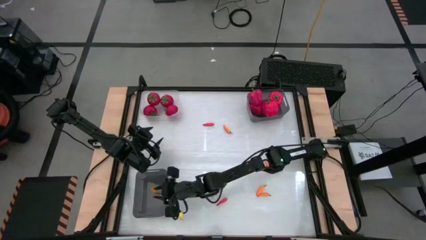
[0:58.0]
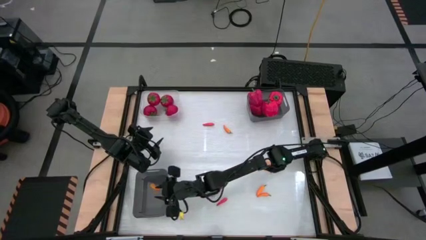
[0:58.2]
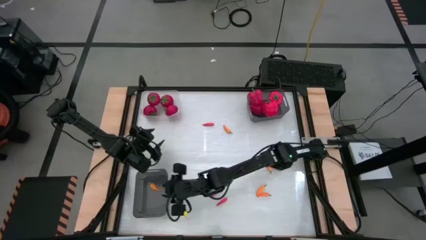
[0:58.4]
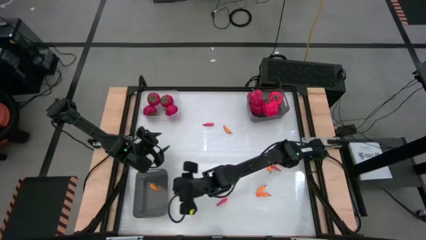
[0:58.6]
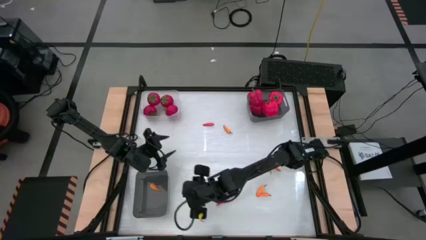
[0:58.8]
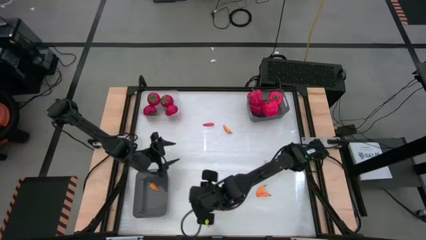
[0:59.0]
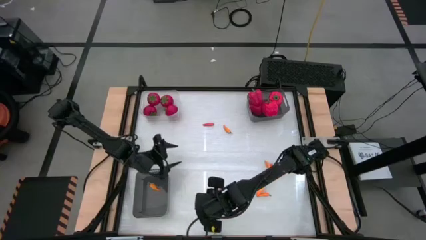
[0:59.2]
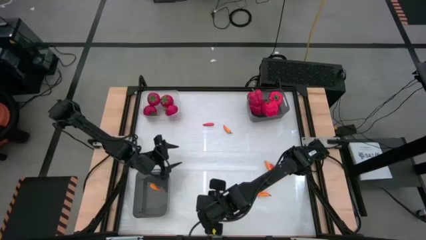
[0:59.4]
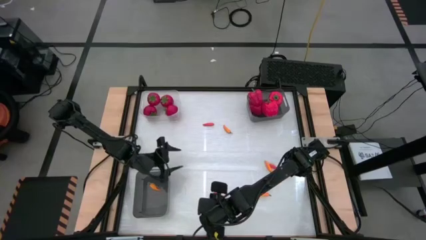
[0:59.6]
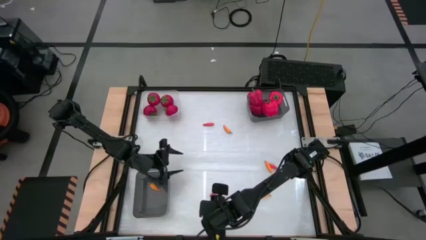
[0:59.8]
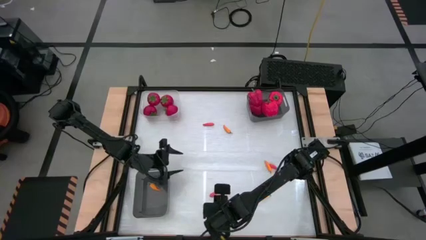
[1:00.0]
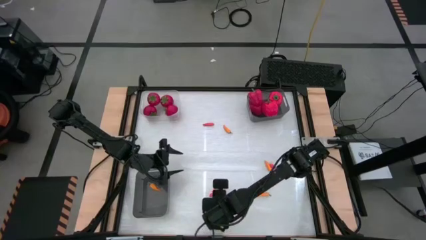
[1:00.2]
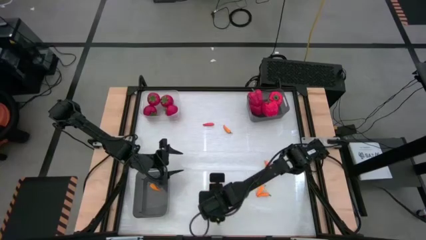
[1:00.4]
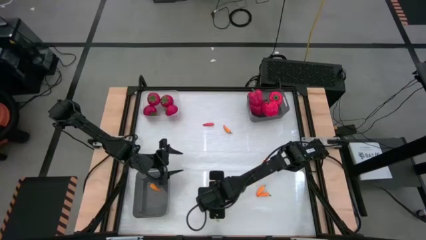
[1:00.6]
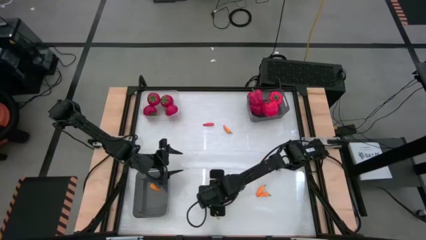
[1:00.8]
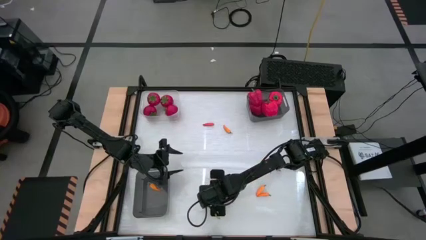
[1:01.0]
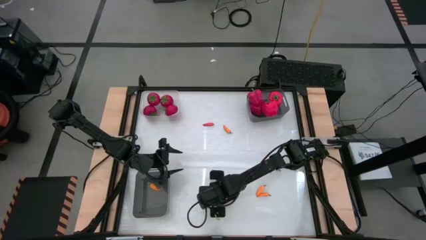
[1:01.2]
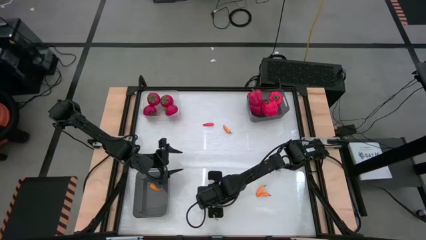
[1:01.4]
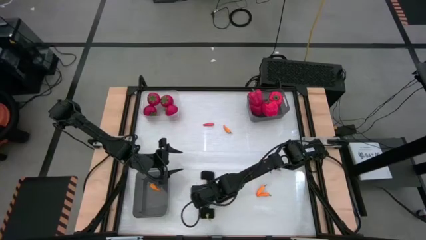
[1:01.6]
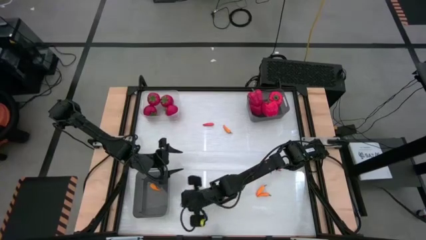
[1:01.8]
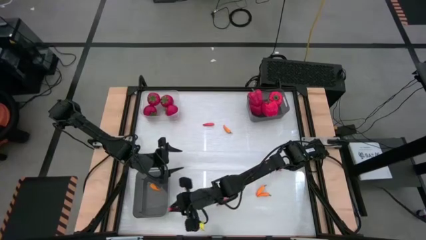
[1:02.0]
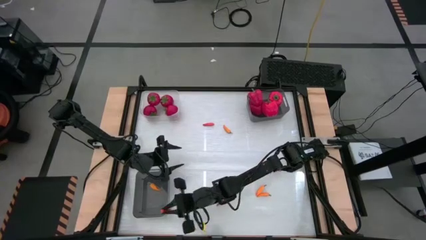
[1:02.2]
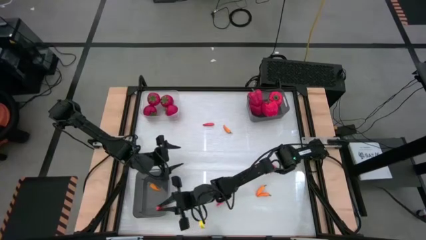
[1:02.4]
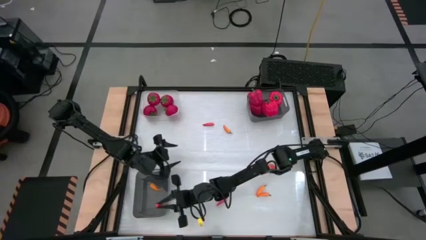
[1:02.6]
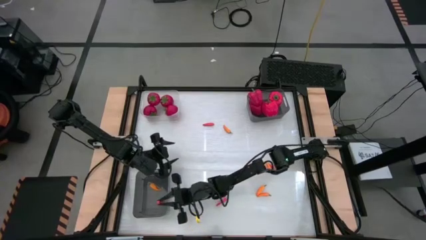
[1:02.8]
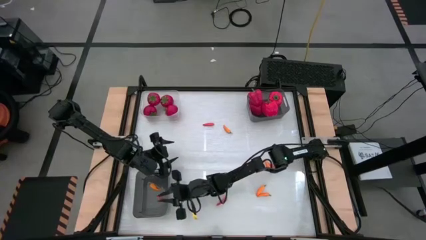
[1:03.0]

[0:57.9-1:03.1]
Task: Sort produce into baskets
Put the orange chili pepper into the bottom black bin

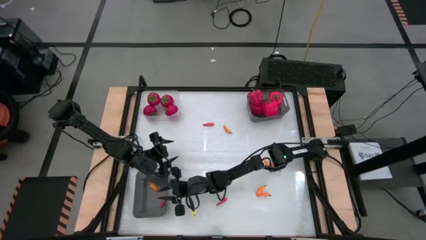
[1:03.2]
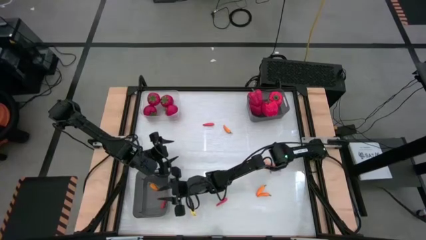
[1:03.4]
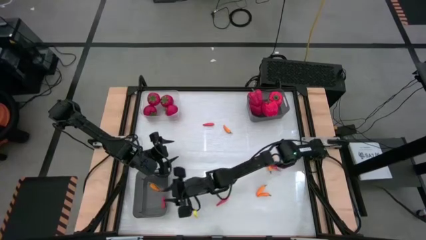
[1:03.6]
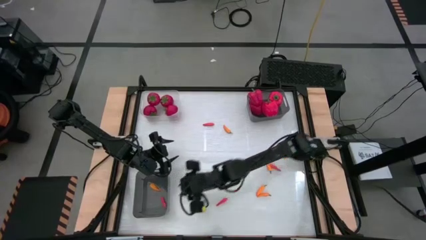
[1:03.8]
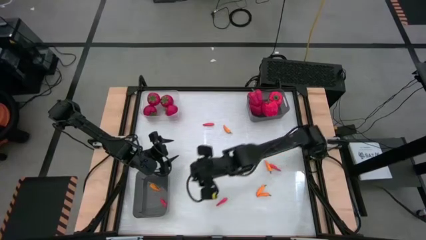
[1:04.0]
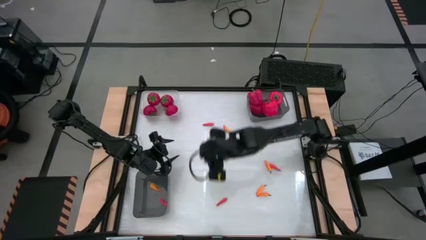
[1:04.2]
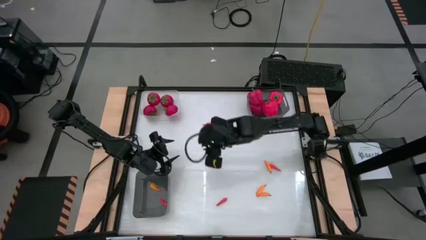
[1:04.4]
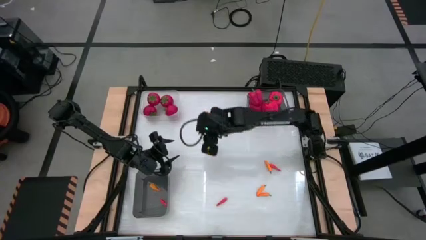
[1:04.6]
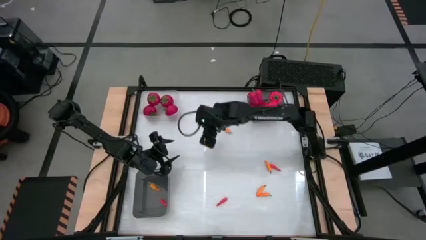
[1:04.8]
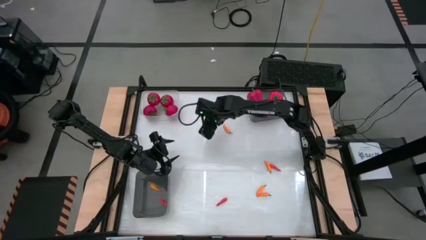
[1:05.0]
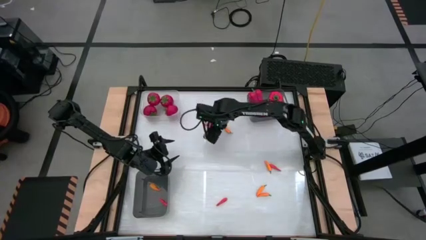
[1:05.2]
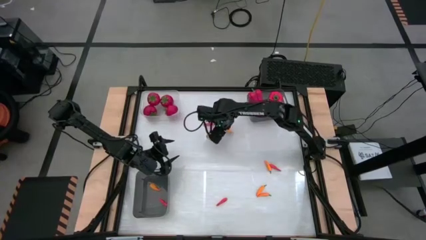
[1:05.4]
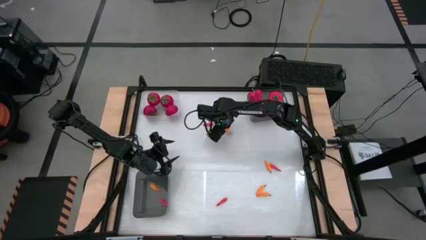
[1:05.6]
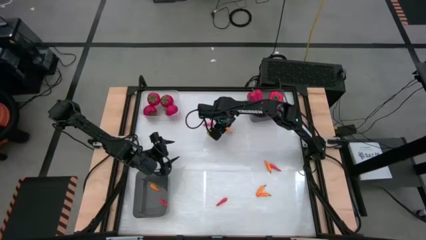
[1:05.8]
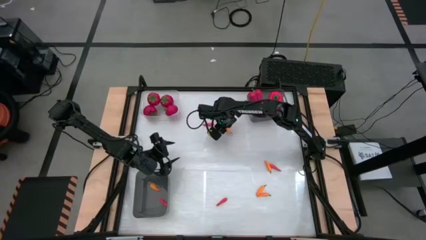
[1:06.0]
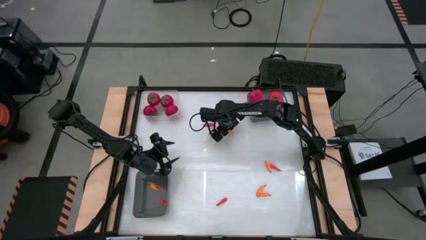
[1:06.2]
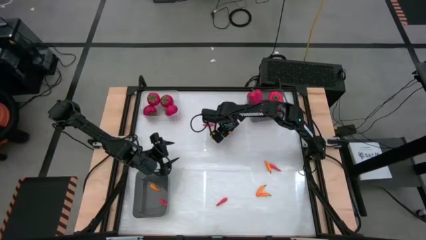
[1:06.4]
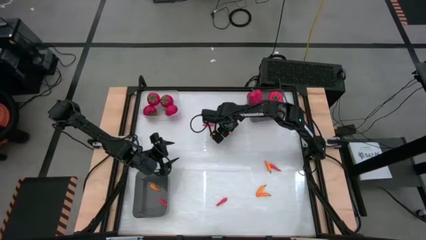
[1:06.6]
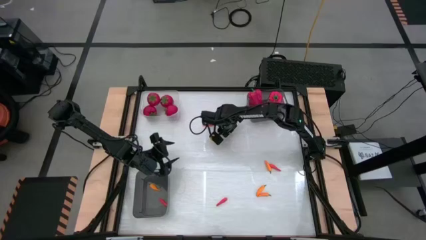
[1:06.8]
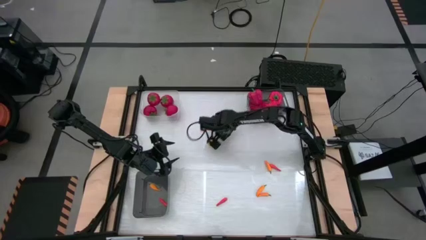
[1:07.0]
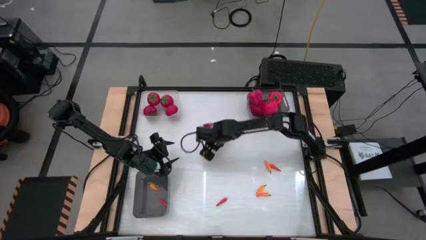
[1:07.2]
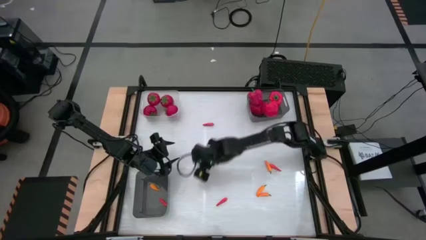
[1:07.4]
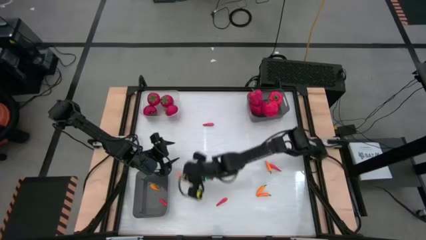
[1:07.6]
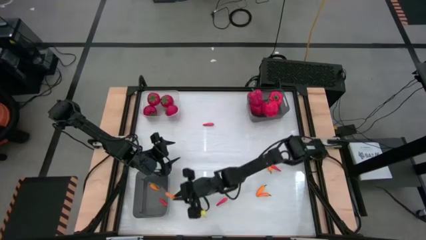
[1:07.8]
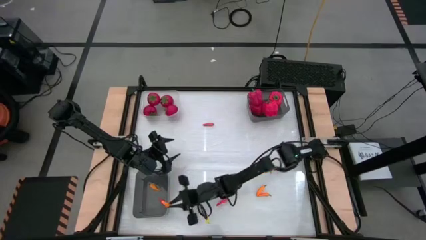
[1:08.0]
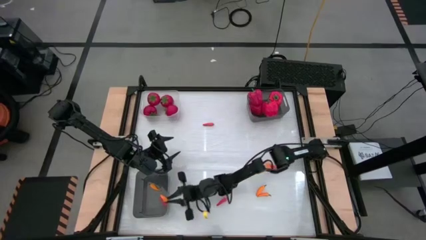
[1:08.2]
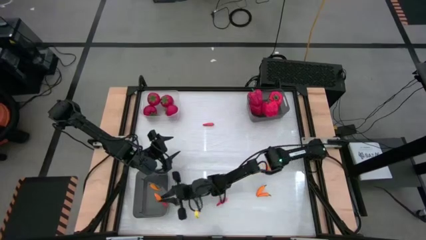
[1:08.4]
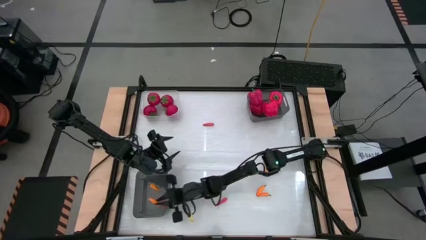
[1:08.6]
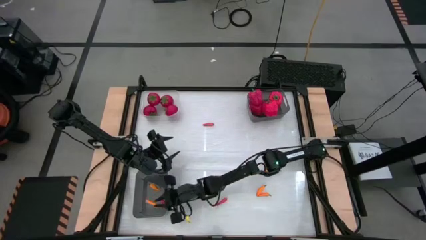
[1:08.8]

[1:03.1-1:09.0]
Put the yellow chili pepper into the bottom black bin

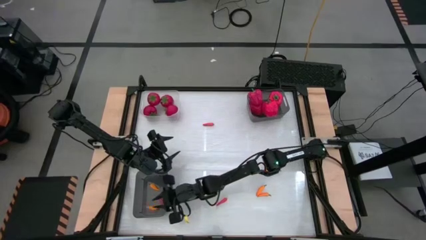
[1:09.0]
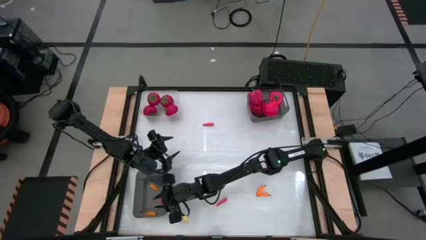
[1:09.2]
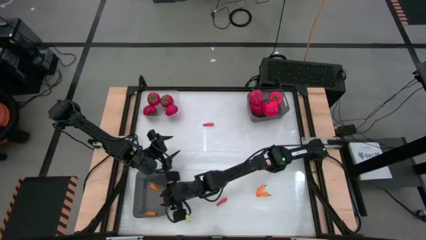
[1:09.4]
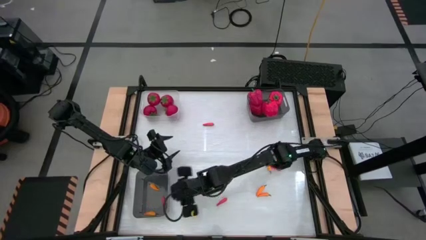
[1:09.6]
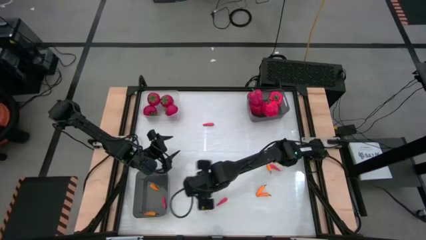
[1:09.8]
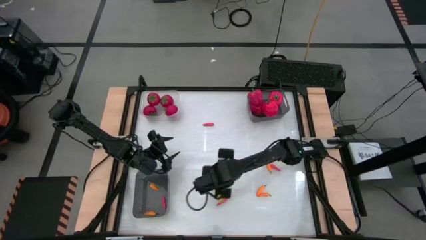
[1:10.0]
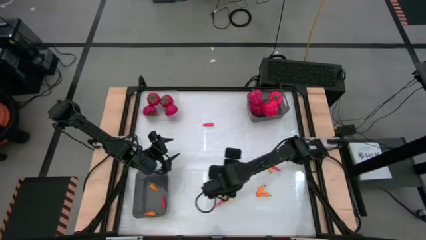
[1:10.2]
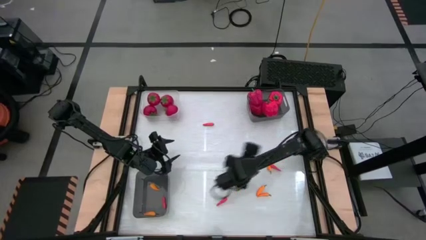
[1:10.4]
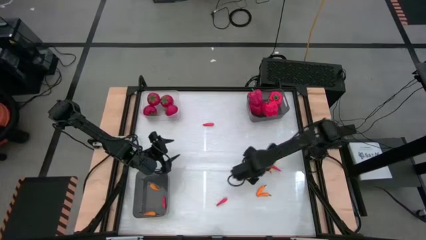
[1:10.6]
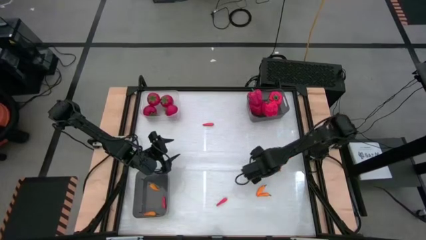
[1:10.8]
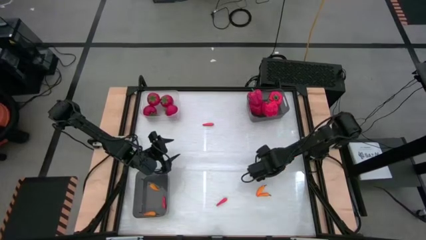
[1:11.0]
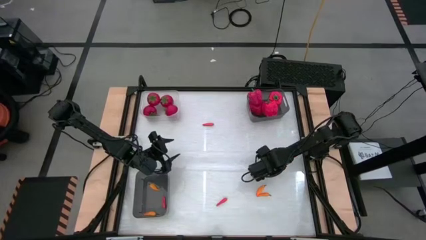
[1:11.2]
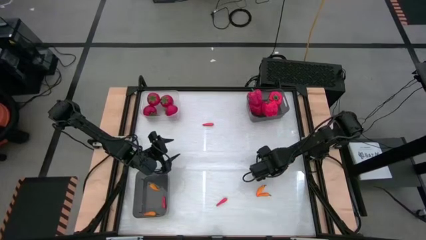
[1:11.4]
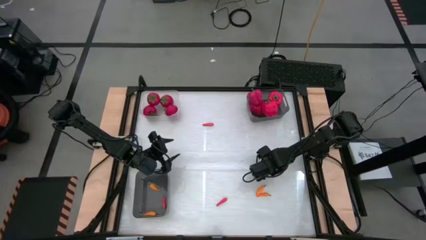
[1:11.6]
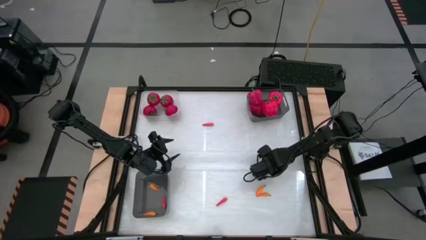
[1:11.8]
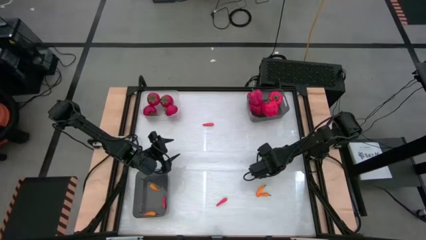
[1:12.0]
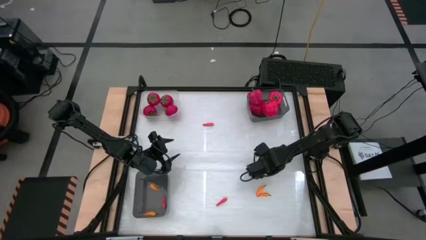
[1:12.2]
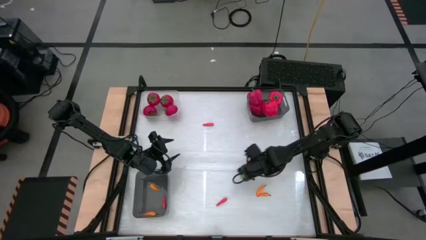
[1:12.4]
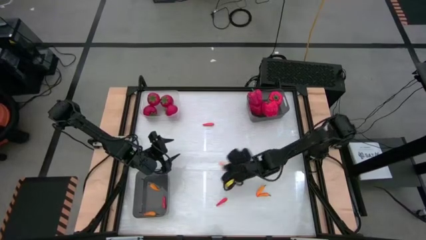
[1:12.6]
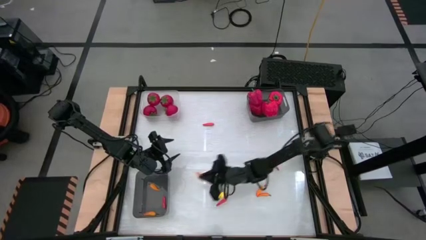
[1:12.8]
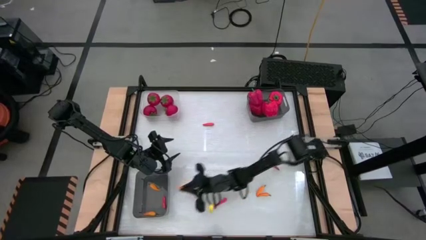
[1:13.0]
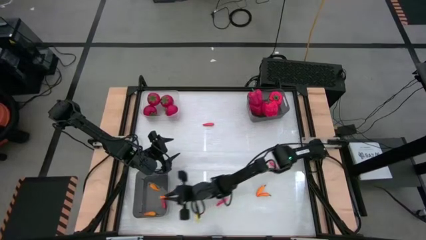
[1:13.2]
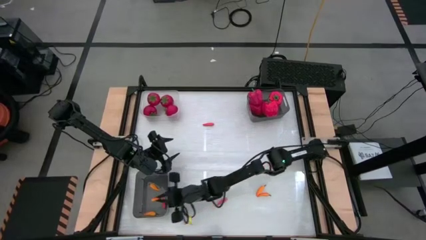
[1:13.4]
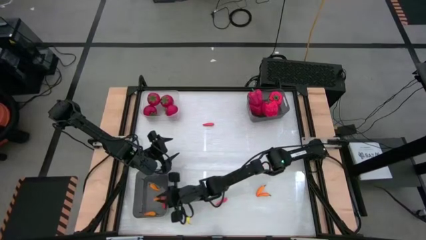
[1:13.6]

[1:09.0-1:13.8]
Put the yellow chili pepper into the bottom black bin
